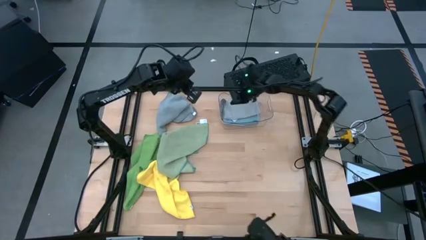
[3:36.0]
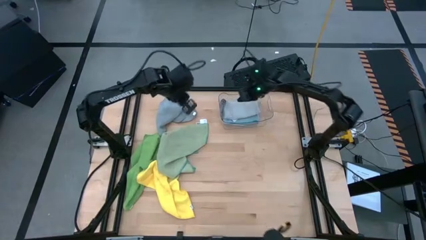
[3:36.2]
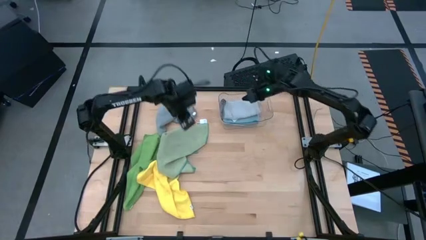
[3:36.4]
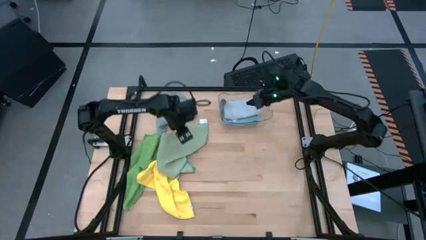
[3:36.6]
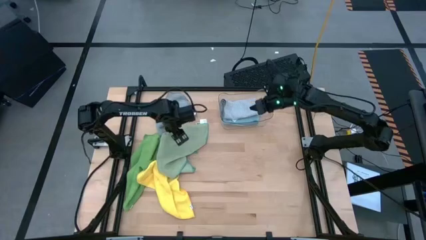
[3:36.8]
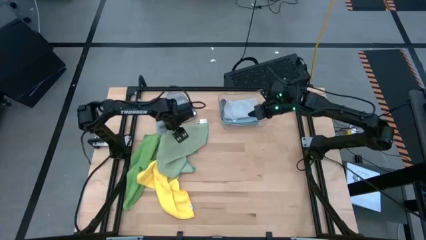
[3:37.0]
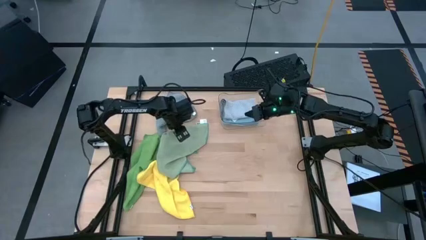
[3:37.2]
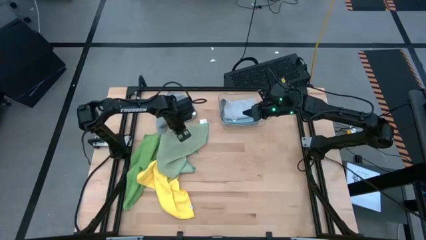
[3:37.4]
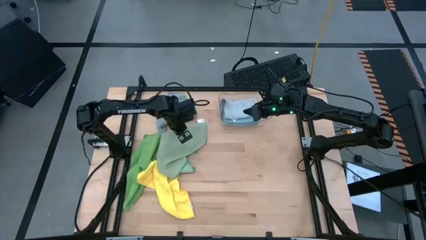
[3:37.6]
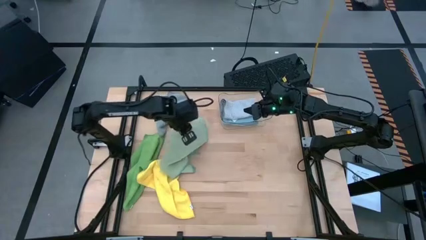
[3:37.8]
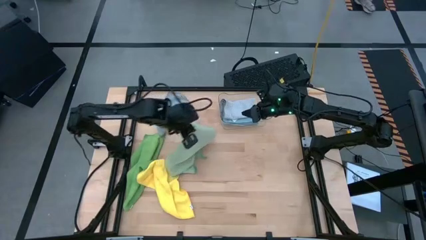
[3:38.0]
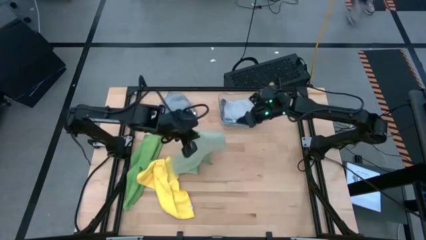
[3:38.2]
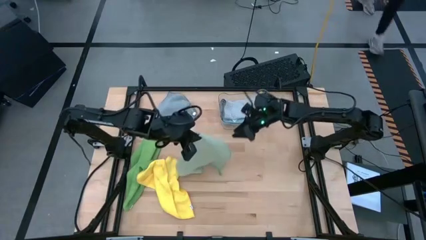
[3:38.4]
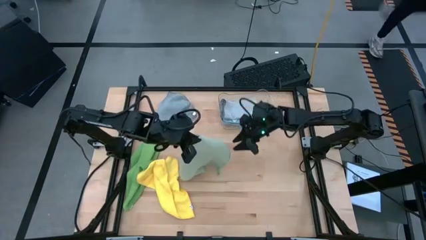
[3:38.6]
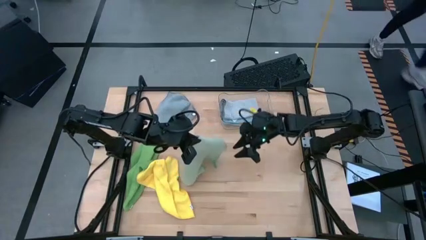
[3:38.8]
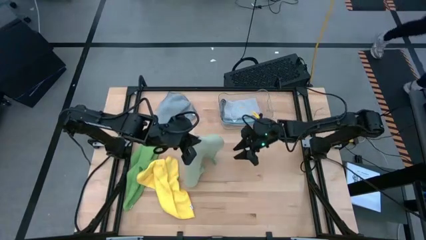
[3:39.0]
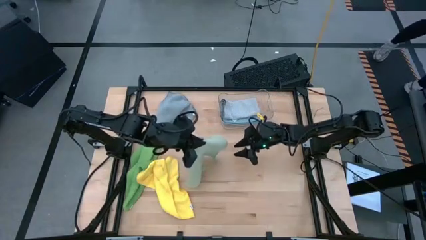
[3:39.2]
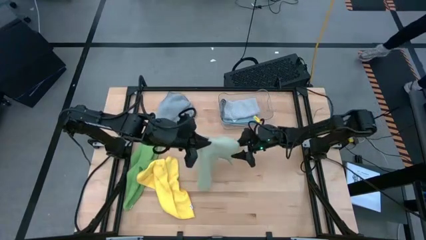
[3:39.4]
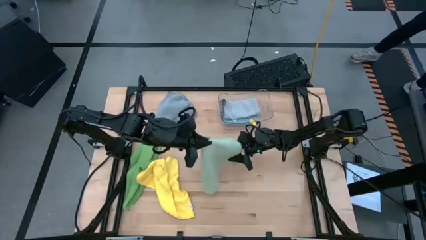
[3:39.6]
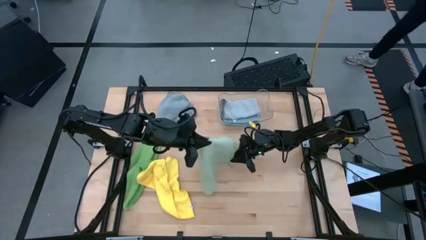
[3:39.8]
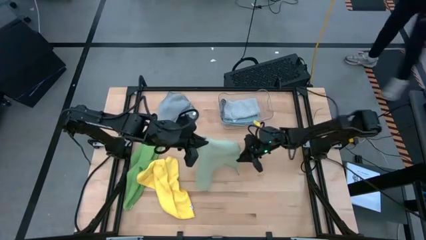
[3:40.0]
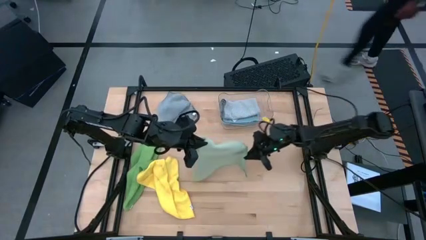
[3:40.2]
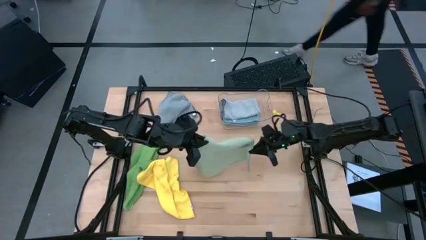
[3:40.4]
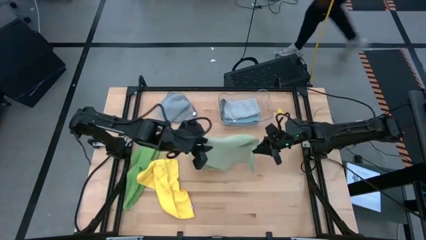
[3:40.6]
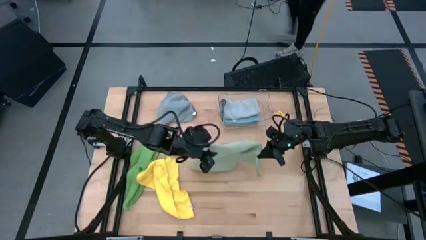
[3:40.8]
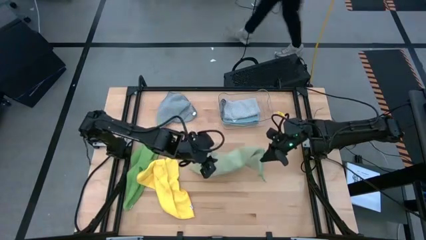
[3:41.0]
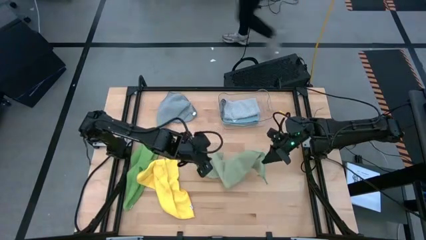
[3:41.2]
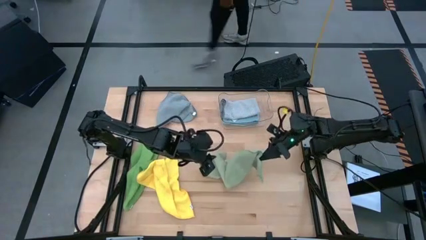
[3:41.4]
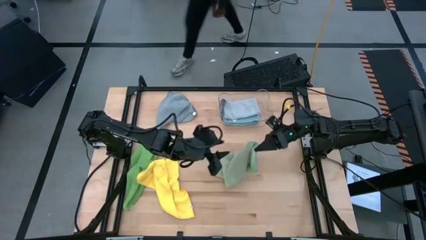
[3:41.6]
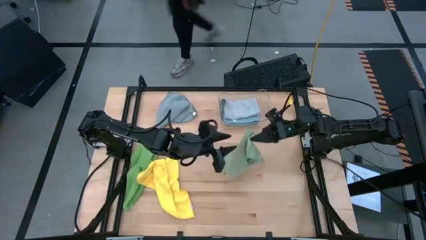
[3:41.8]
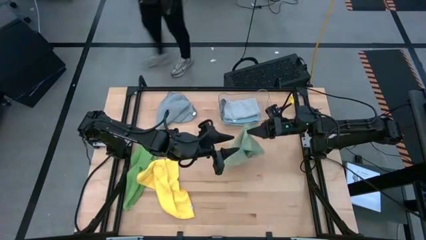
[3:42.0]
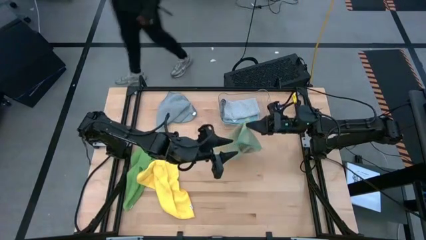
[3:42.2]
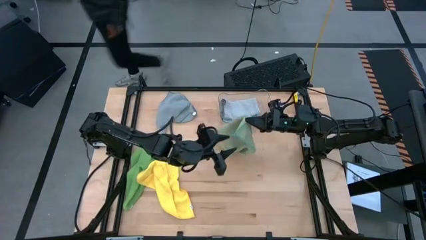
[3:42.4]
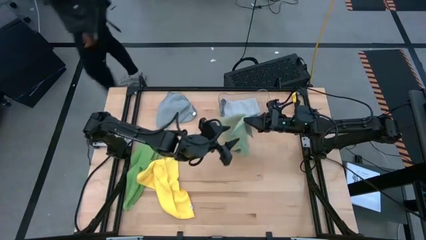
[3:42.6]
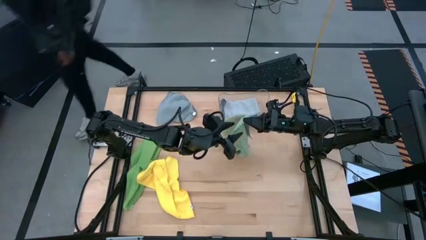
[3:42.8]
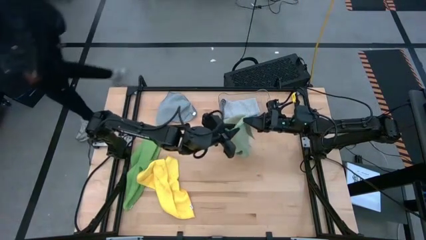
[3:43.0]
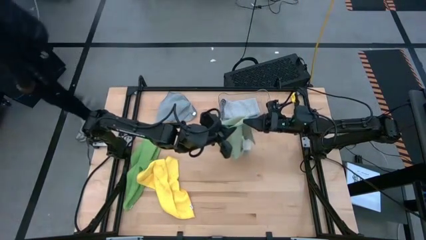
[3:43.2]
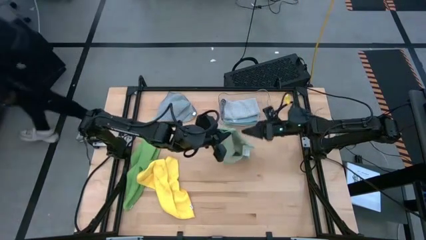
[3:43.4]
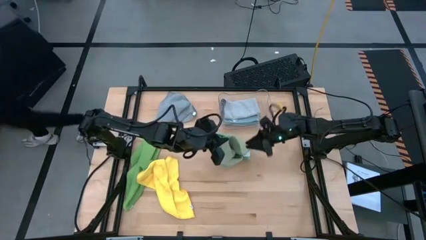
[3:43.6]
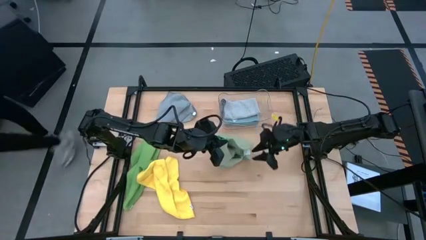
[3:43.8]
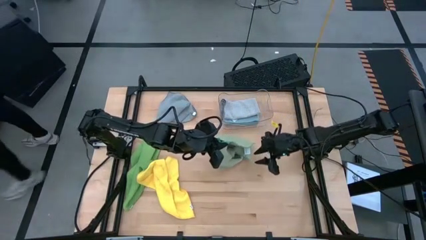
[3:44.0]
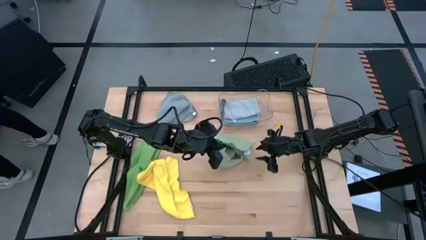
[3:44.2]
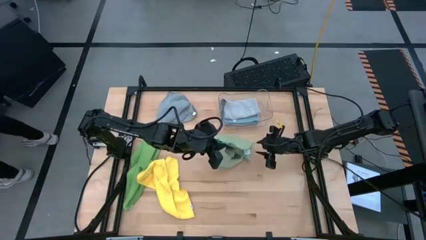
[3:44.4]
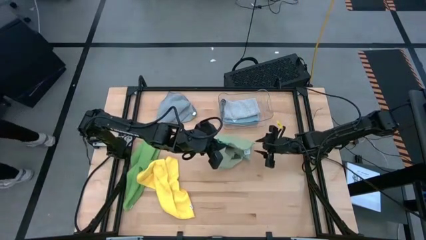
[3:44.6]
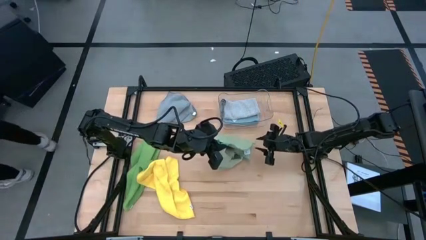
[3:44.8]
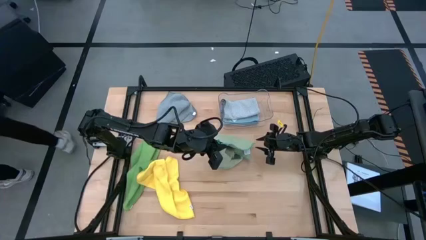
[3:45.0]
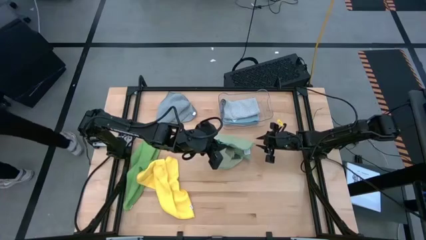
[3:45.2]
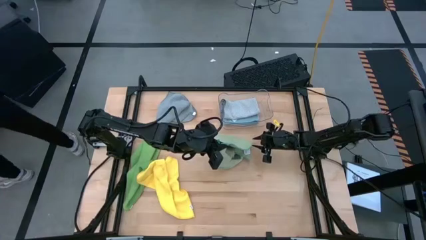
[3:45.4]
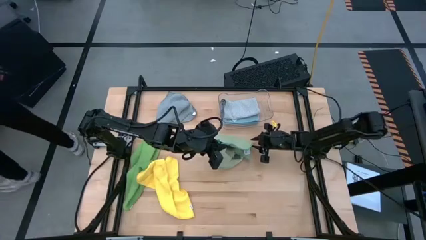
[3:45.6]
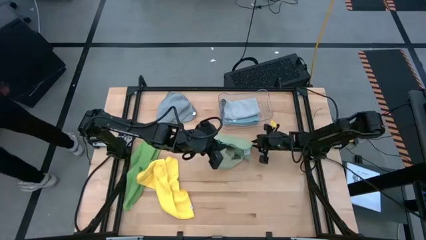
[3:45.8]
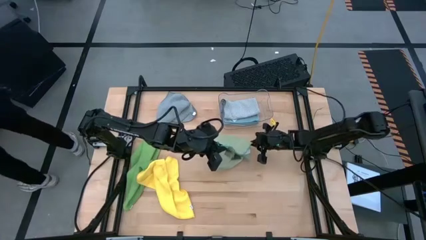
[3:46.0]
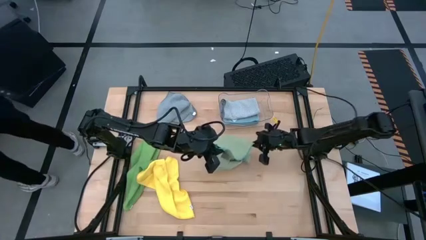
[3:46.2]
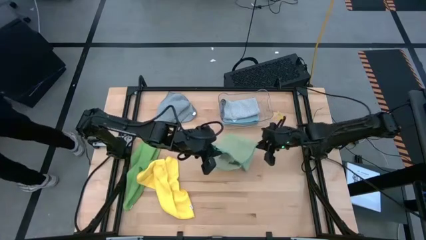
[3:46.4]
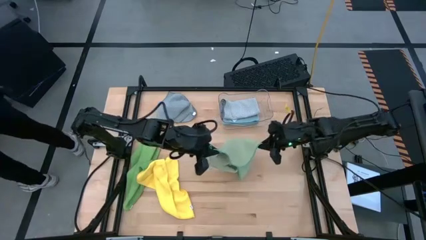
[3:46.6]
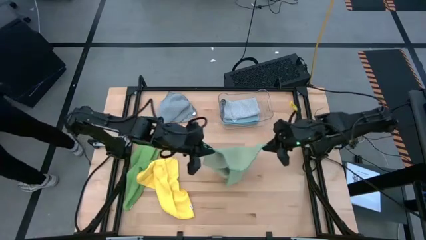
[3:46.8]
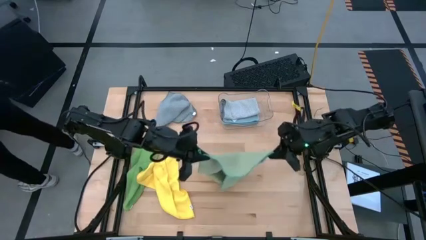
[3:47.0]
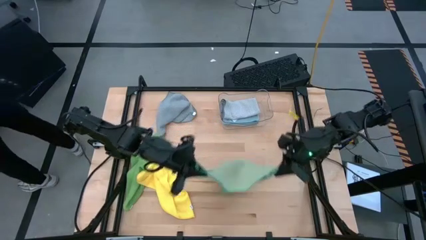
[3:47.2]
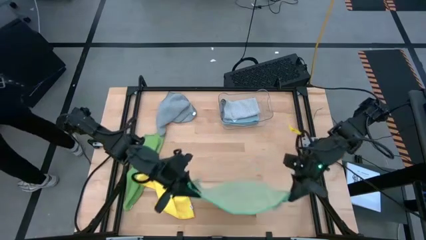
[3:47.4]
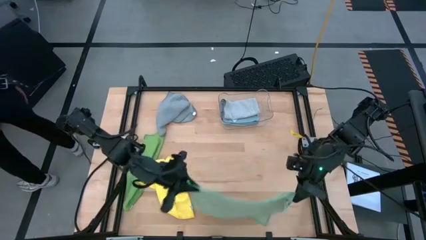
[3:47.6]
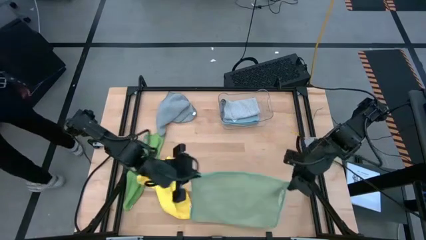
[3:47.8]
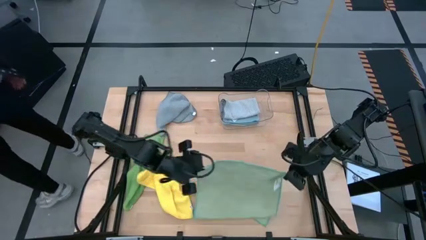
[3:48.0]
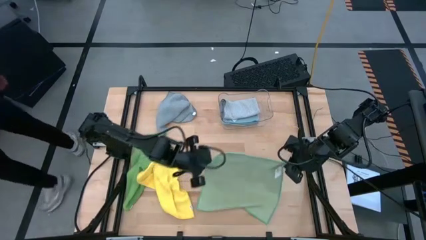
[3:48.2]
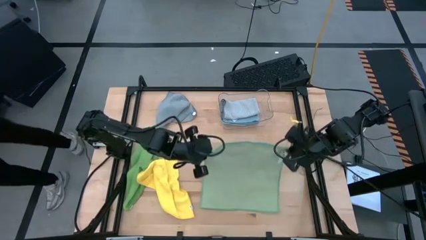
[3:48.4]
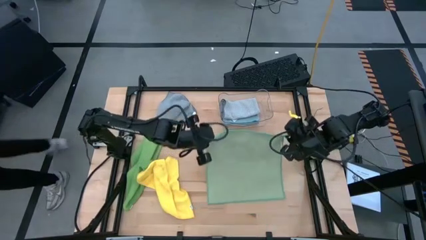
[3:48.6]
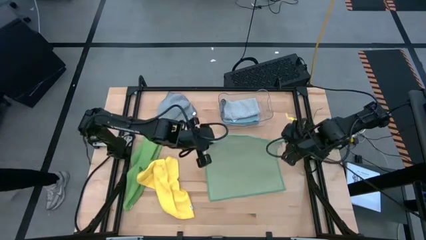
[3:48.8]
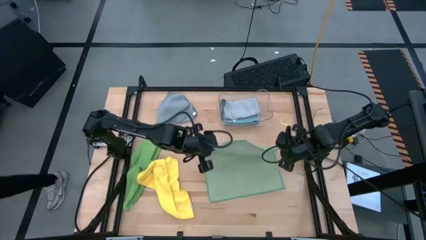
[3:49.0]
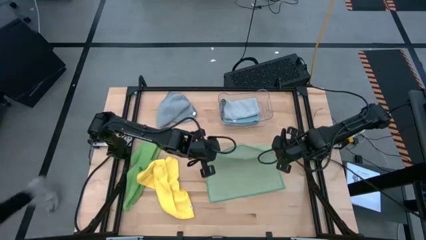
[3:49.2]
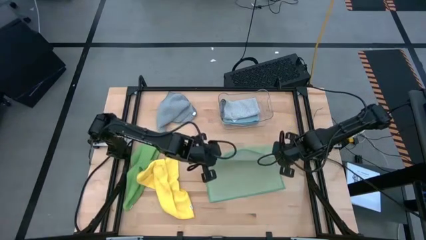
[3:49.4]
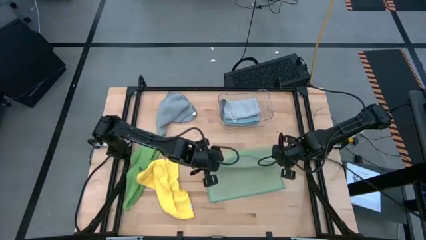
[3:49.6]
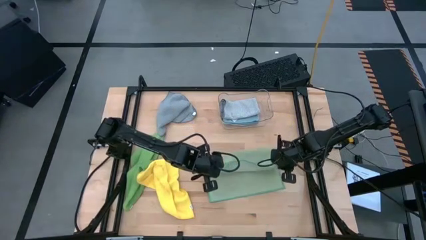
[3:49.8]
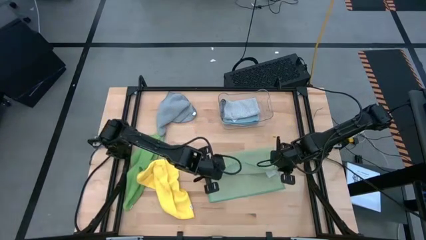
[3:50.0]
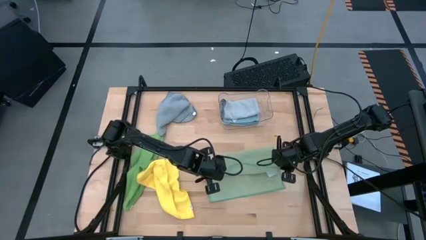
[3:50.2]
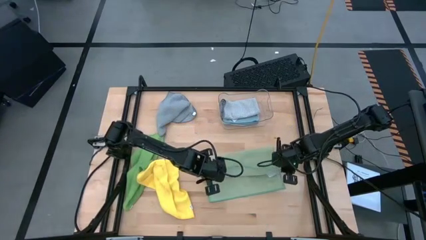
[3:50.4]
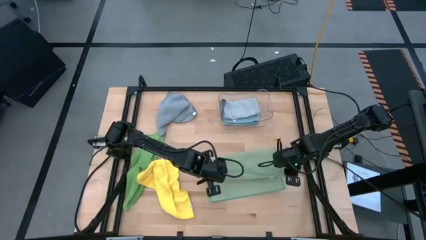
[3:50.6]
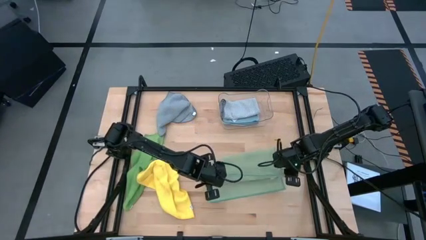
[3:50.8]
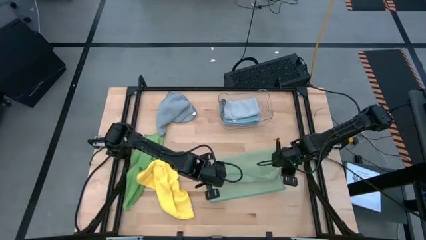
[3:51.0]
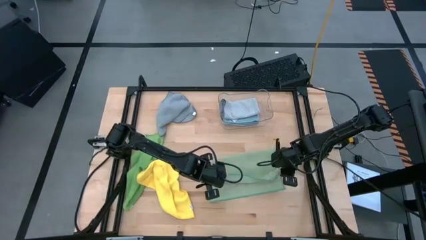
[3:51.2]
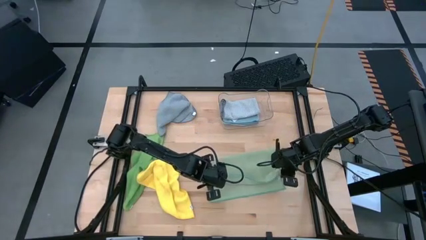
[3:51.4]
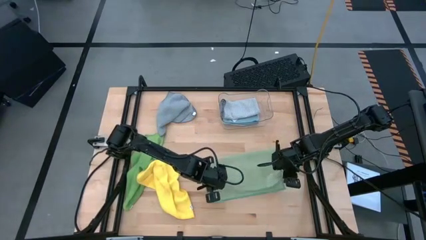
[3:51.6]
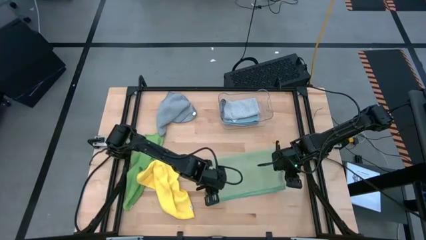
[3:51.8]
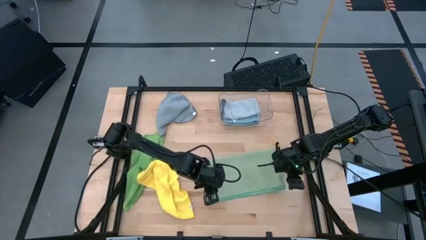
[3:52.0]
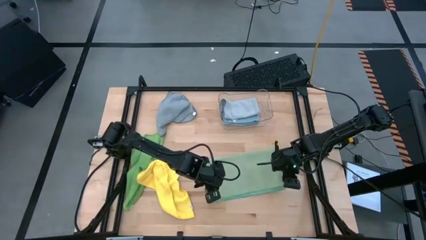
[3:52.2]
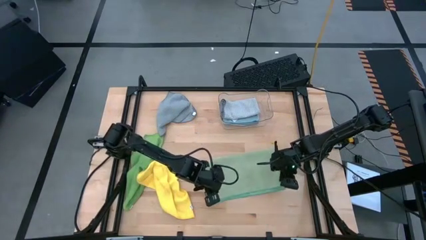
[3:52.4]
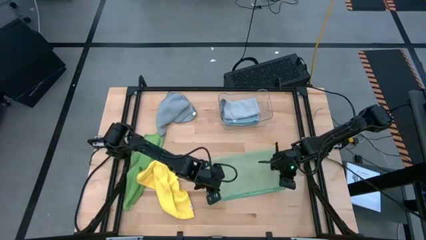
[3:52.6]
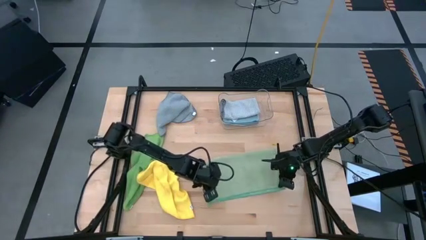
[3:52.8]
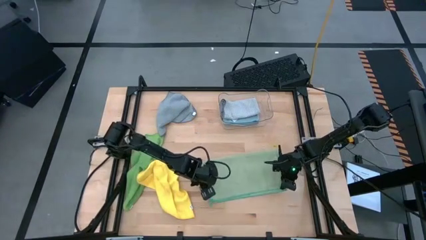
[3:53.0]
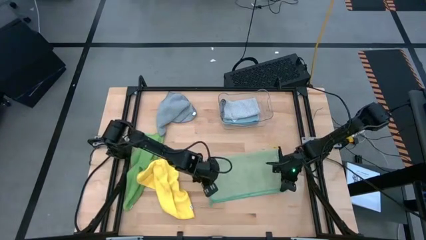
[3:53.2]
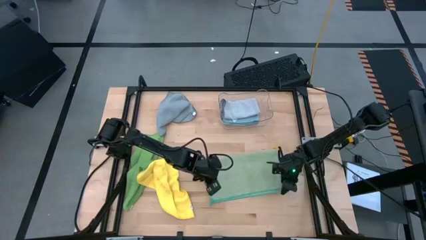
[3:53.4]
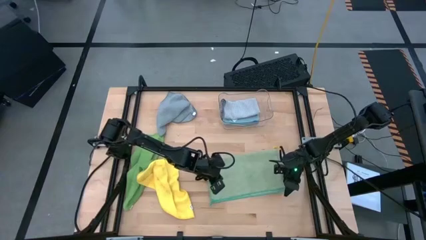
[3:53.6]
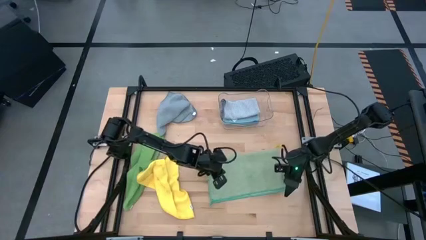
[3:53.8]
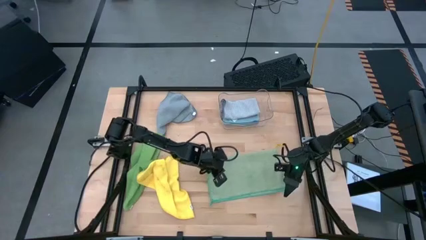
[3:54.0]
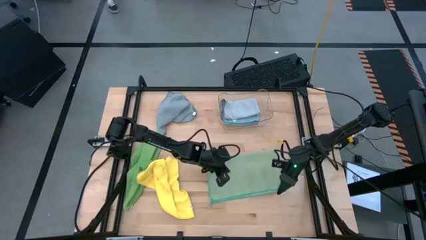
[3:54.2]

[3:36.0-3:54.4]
Task: Fold microfiber towels
Fold the light green towel
